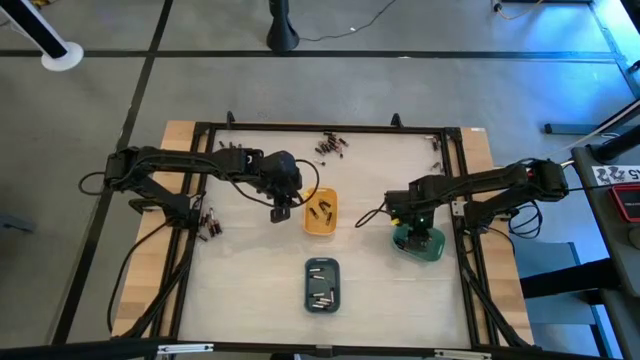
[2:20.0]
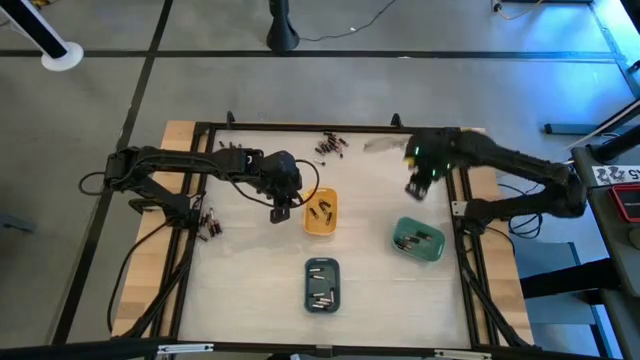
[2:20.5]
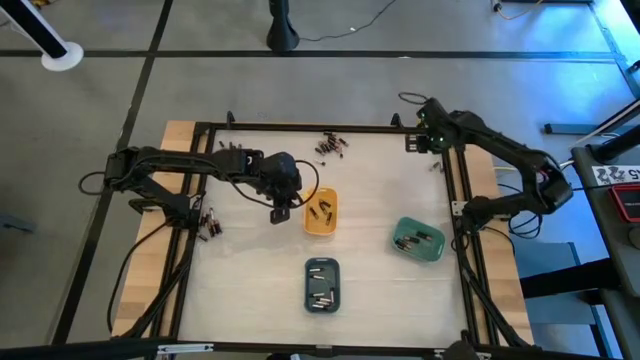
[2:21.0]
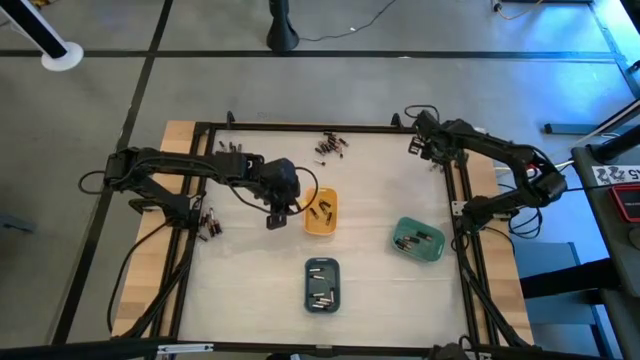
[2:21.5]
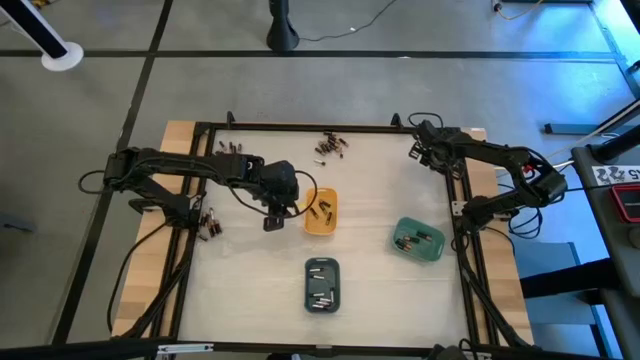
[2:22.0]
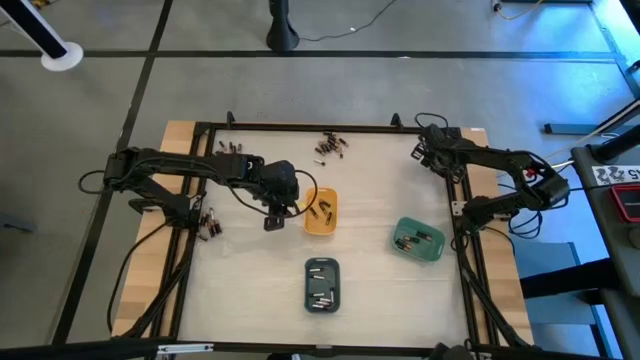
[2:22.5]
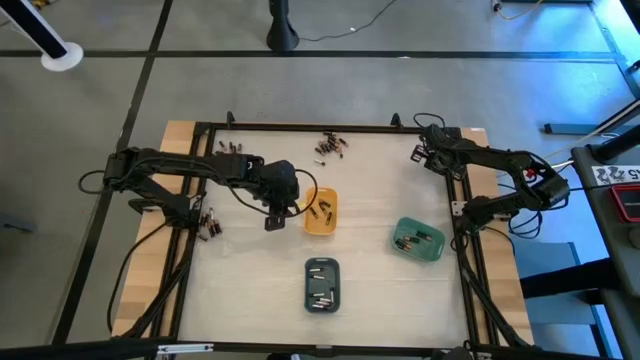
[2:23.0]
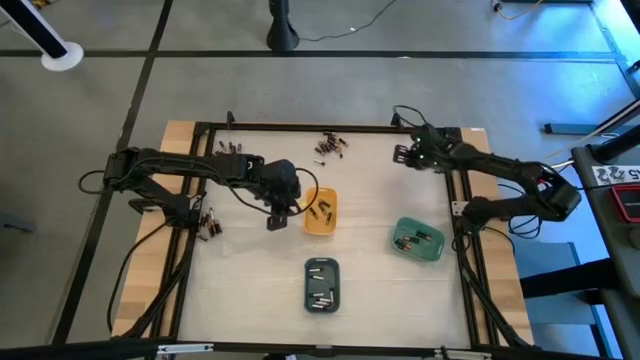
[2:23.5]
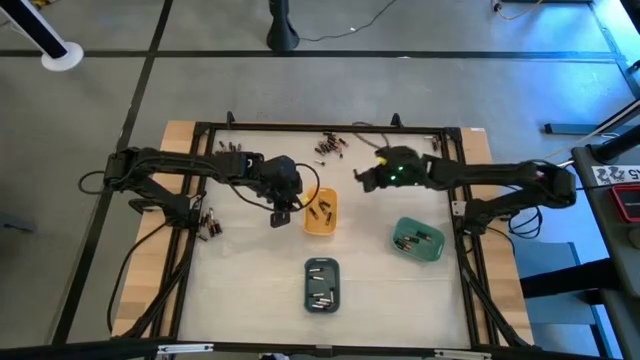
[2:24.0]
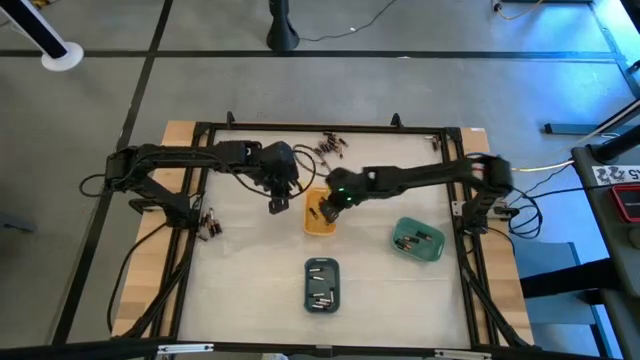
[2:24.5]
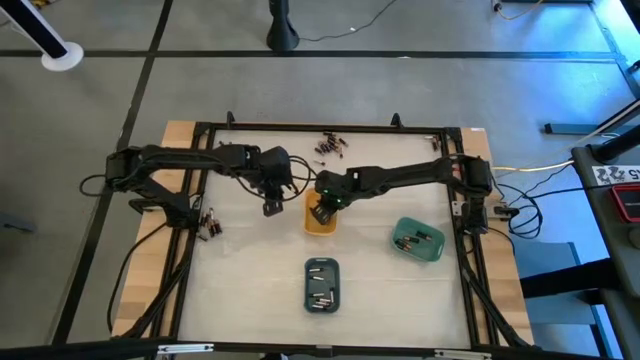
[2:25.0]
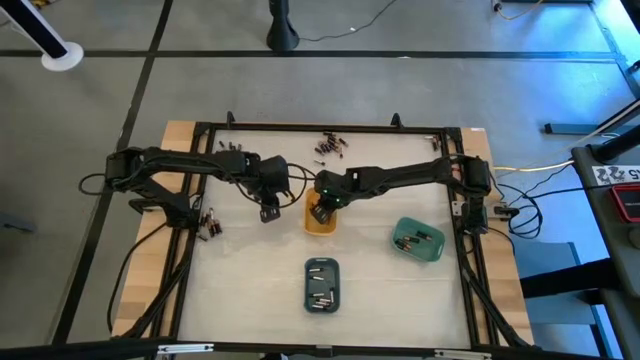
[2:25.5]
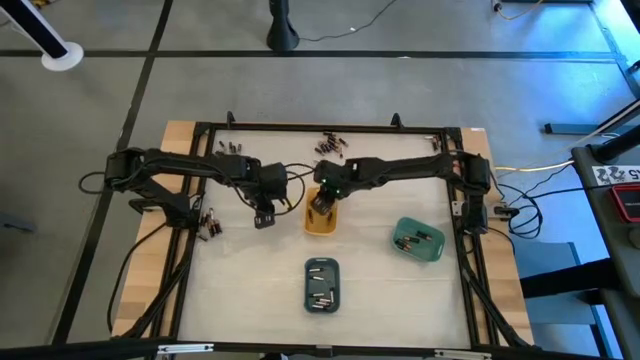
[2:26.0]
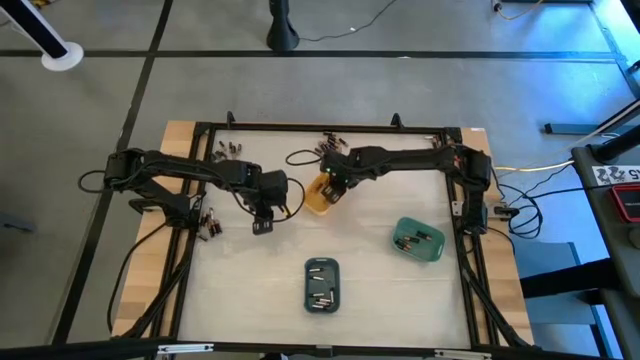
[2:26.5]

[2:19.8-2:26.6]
Task: Sort batteries
Put the black battery into the yellow bin

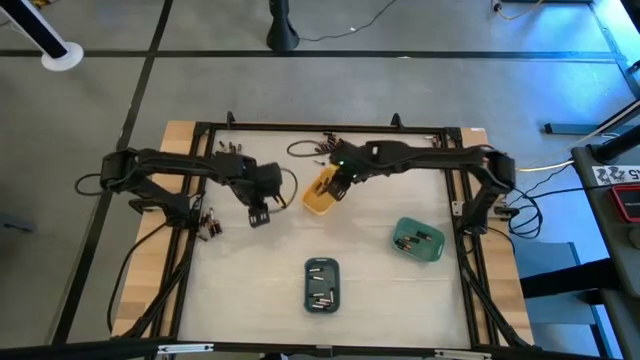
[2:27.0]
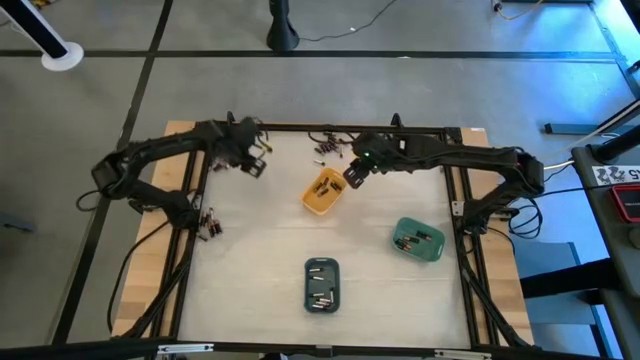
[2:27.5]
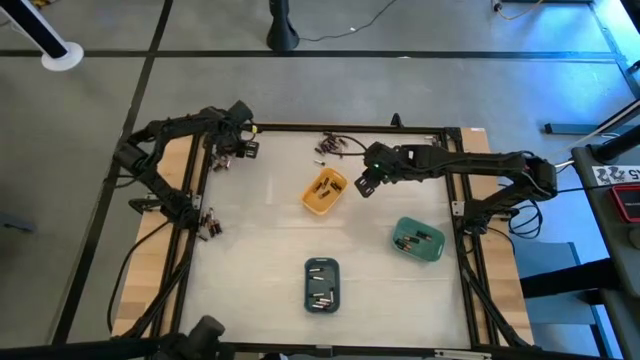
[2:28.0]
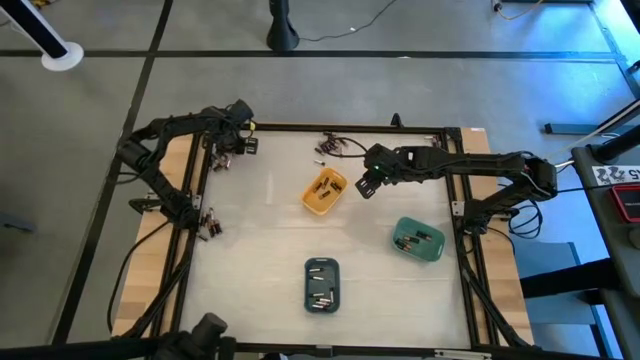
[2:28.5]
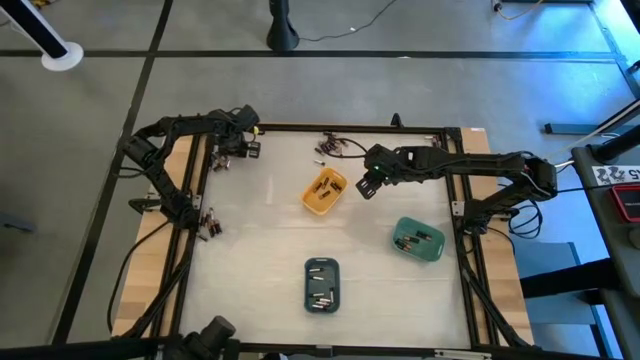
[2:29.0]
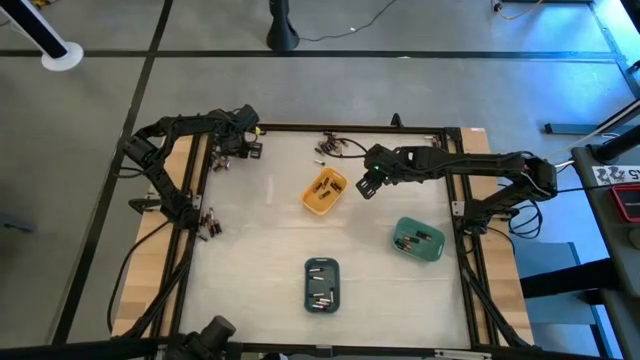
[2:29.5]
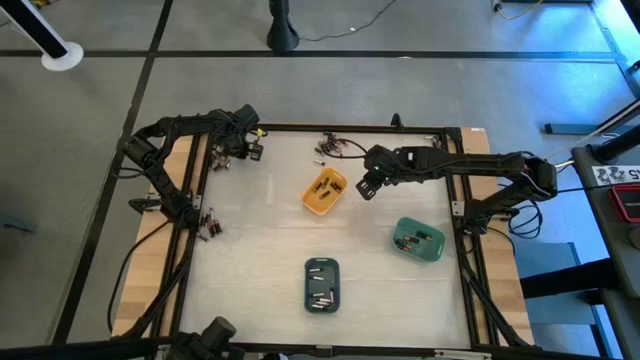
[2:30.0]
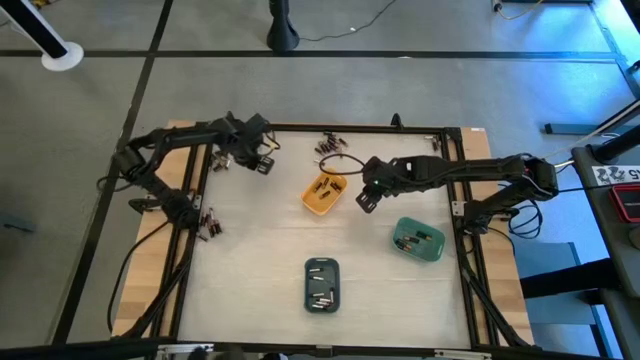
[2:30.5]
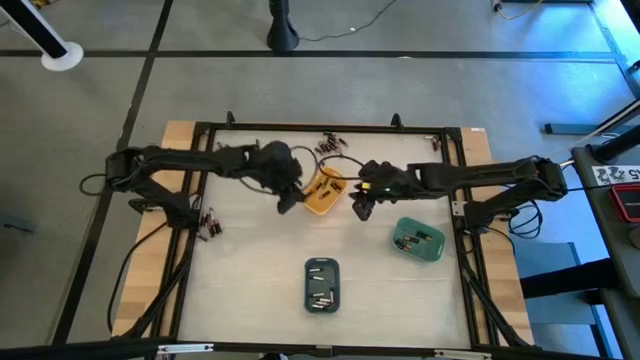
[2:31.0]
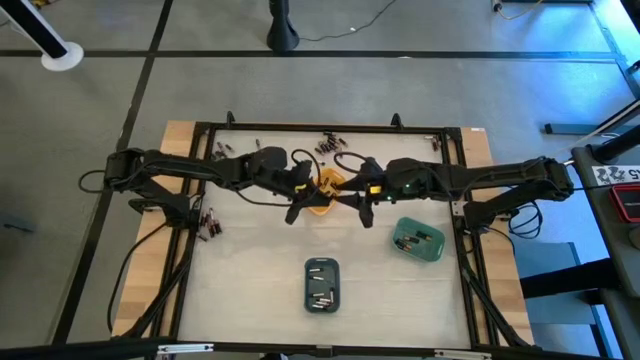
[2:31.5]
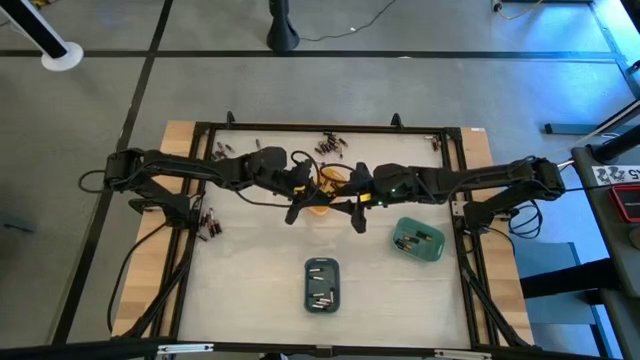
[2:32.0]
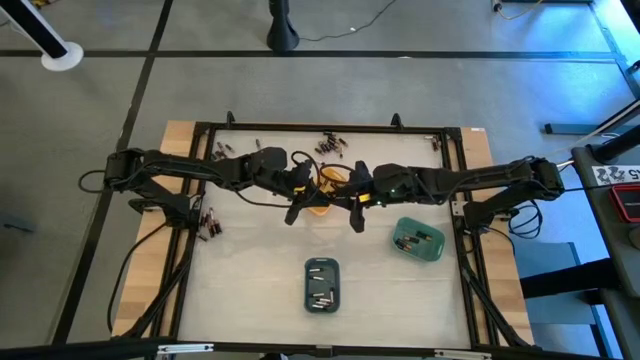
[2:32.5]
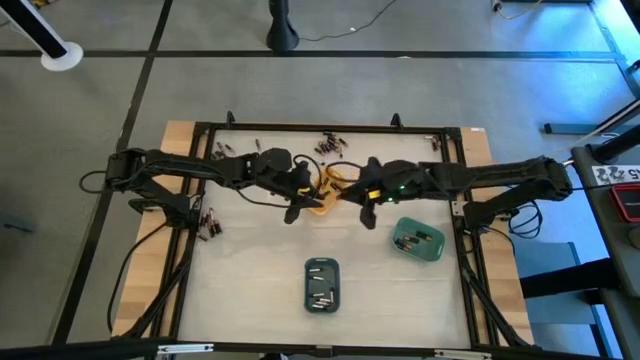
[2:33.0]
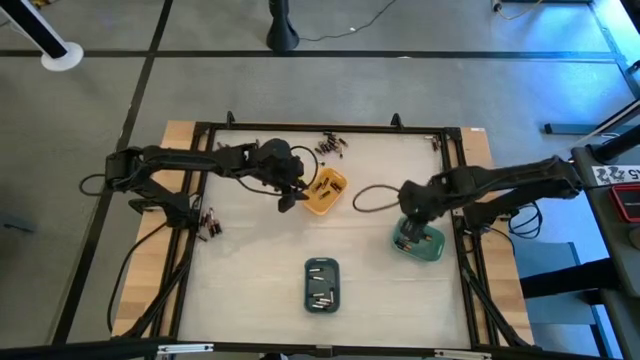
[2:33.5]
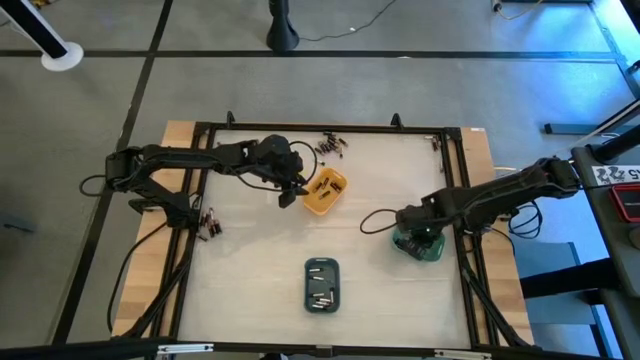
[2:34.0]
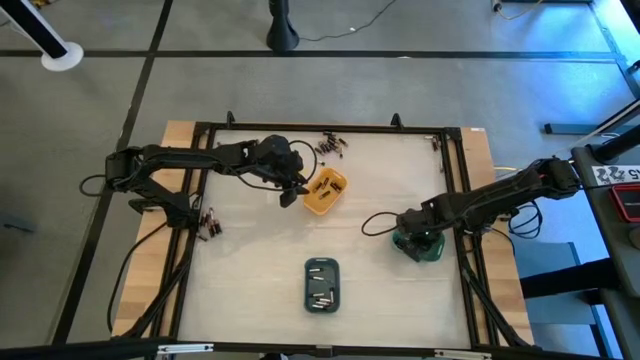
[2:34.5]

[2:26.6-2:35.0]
Put the black battery into the green bin

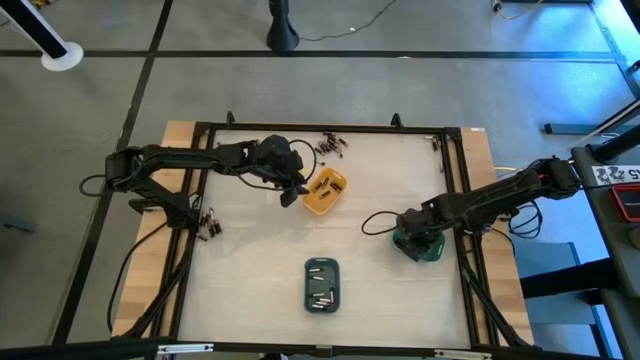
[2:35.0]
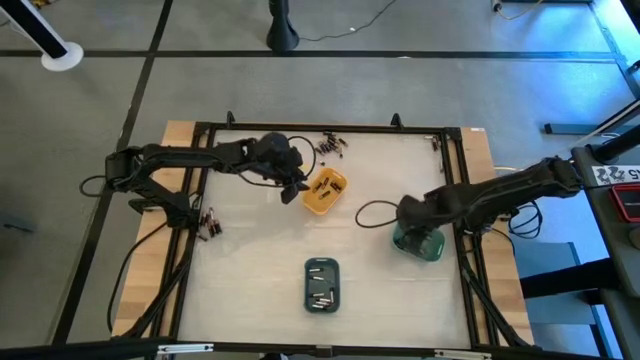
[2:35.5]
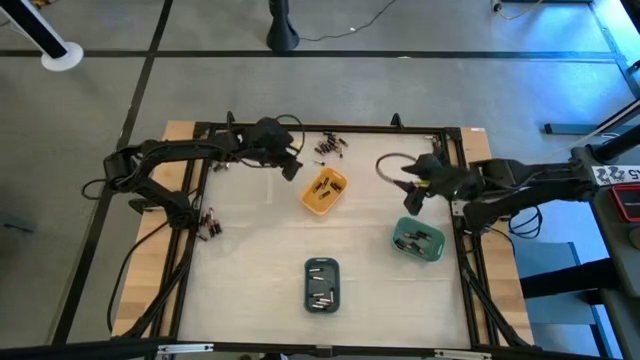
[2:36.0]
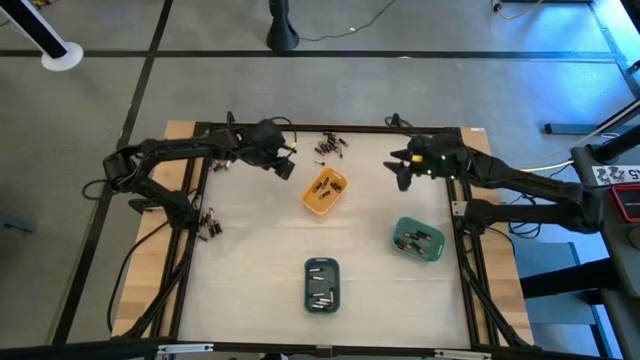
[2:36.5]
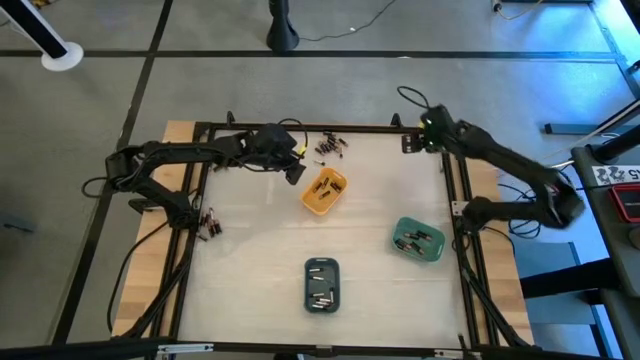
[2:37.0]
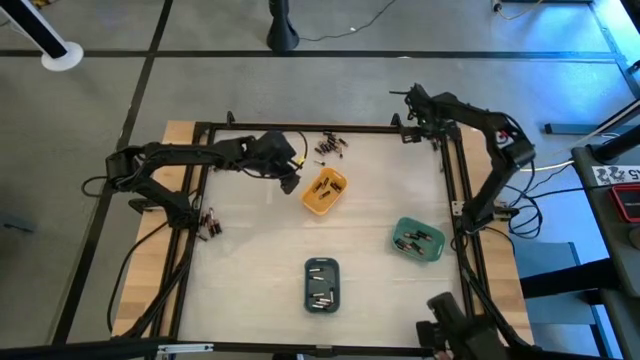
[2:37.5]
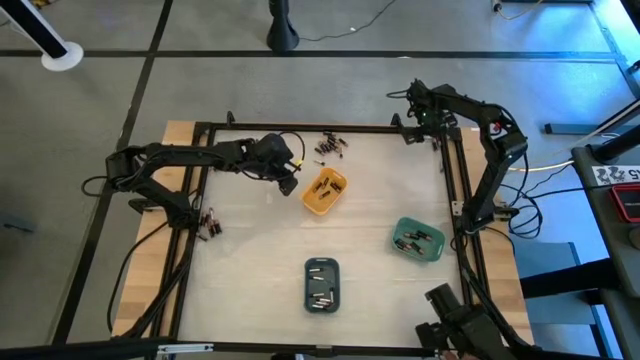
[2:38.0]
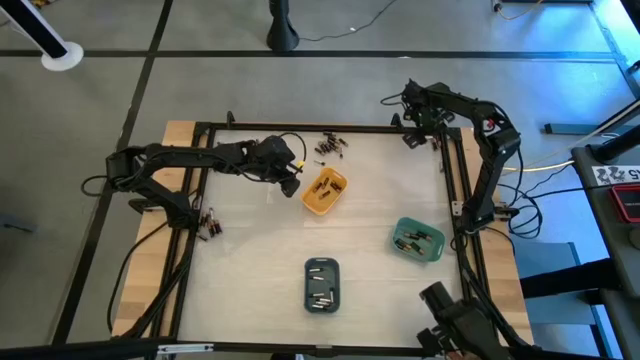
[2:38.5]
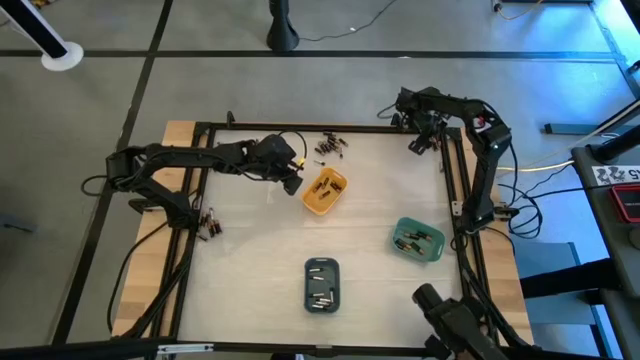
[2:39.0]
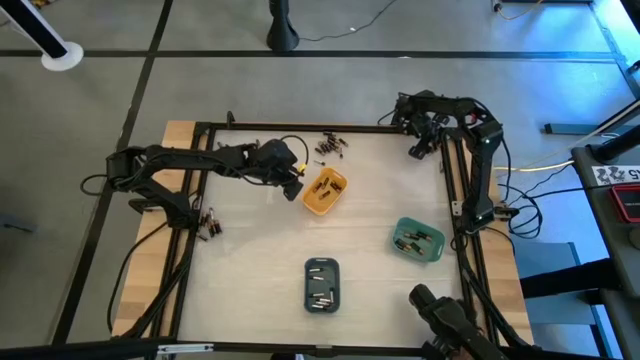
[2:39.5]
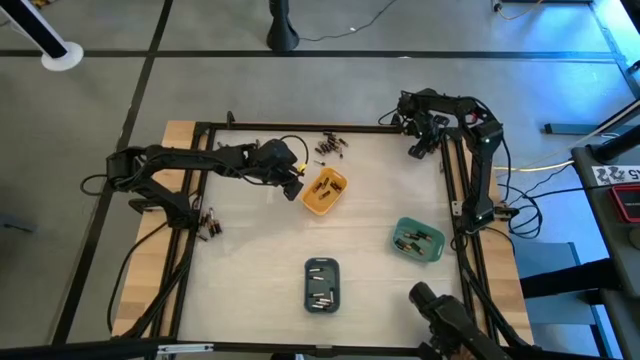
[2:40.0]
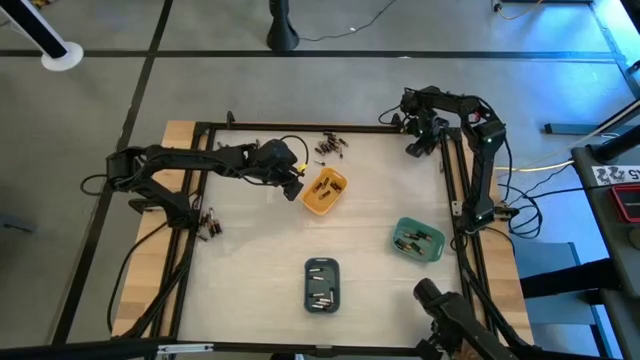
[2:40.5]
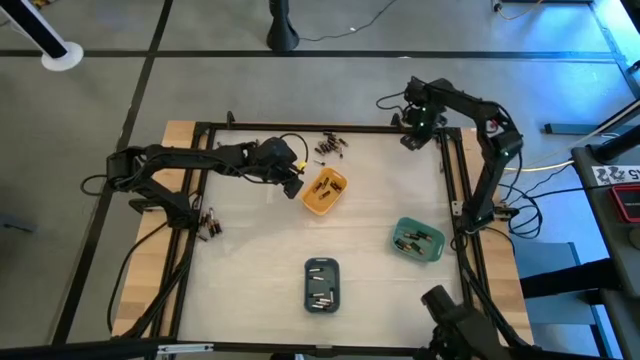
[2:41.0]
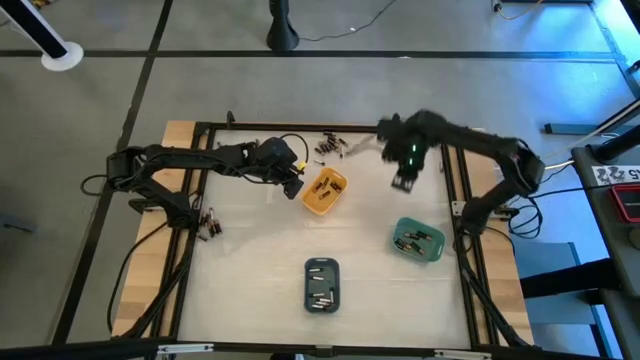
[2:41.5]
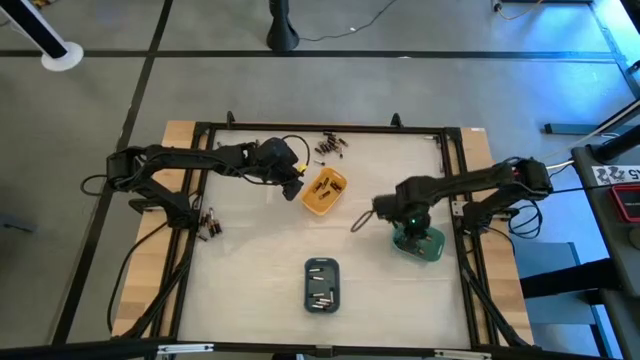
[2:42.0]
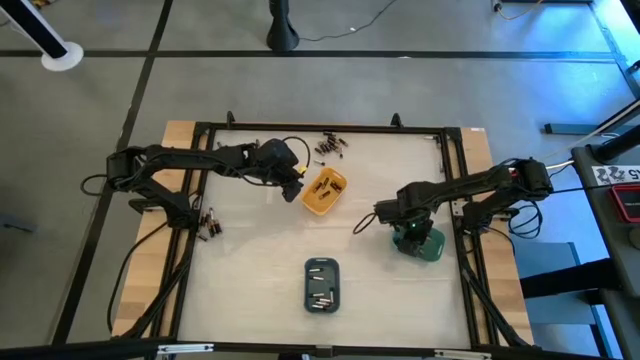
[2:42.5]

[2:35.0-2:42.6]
Put the black battery into the green bin
